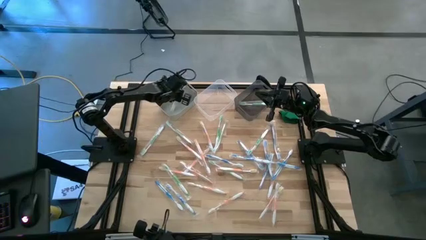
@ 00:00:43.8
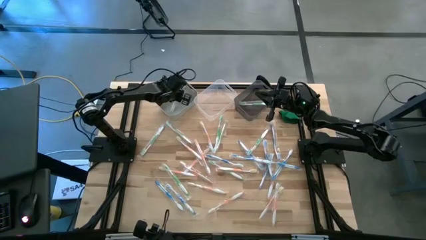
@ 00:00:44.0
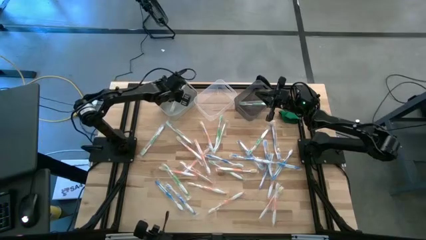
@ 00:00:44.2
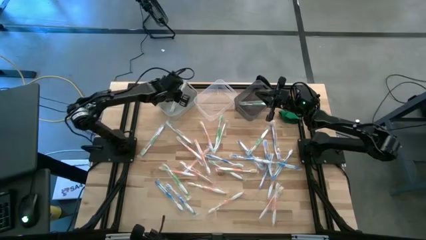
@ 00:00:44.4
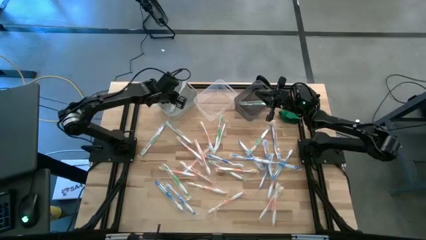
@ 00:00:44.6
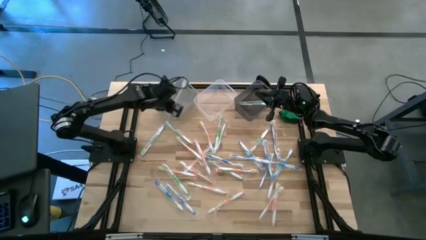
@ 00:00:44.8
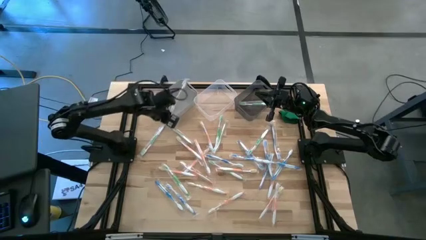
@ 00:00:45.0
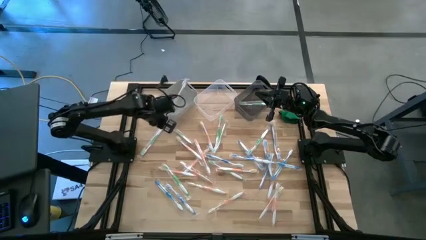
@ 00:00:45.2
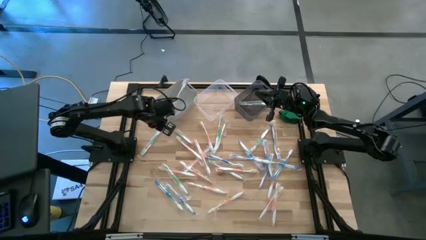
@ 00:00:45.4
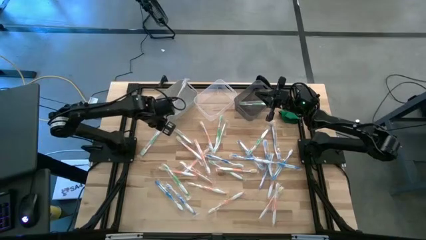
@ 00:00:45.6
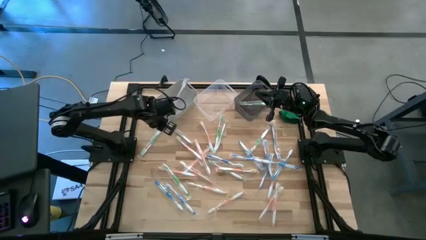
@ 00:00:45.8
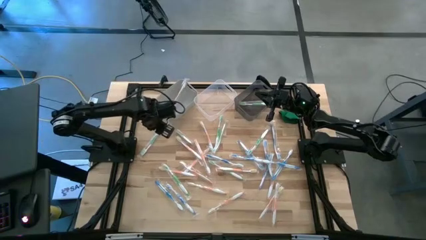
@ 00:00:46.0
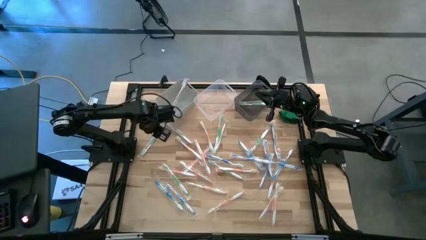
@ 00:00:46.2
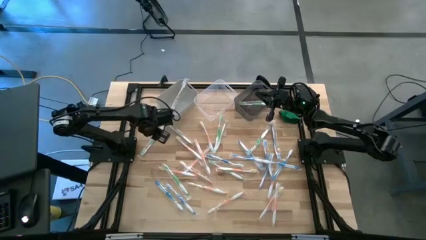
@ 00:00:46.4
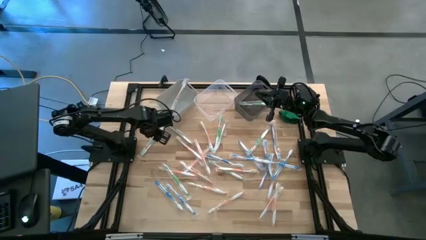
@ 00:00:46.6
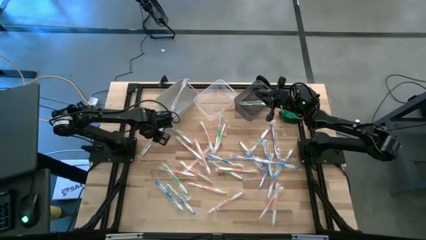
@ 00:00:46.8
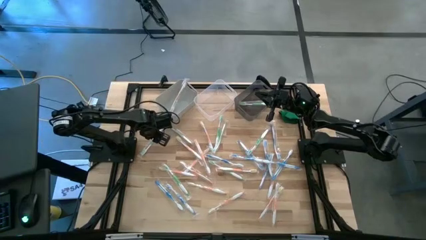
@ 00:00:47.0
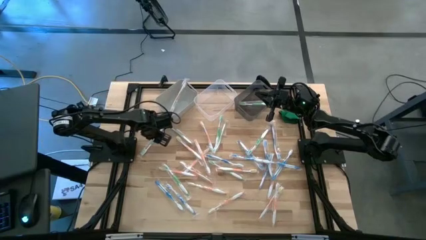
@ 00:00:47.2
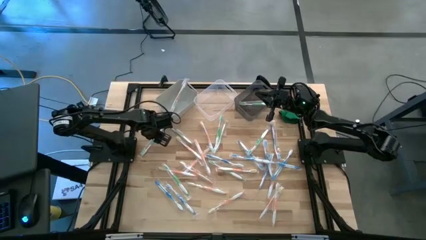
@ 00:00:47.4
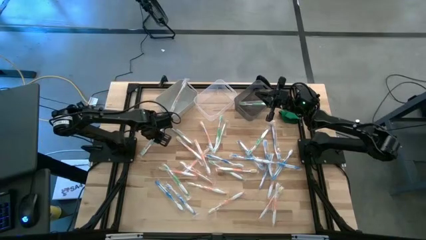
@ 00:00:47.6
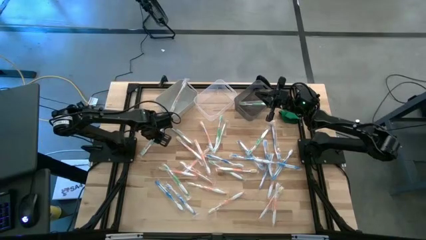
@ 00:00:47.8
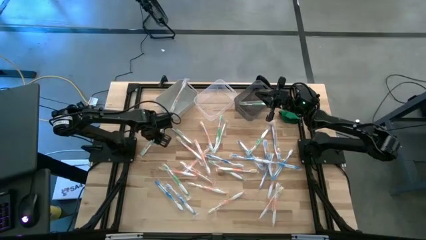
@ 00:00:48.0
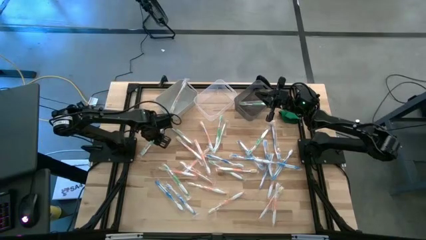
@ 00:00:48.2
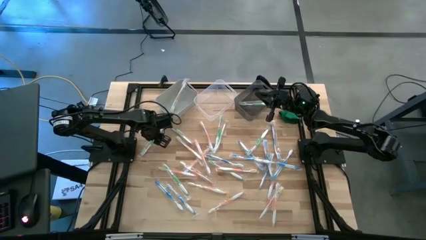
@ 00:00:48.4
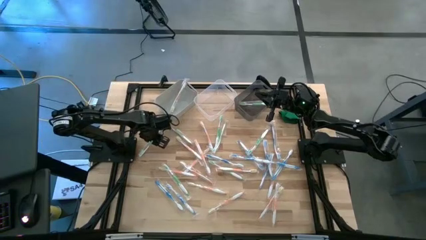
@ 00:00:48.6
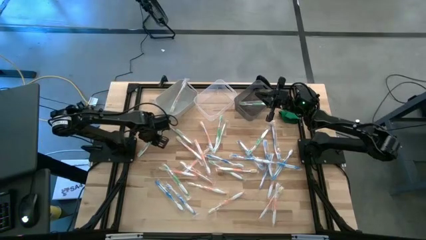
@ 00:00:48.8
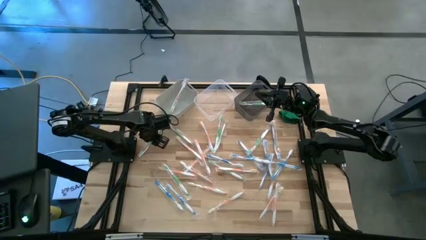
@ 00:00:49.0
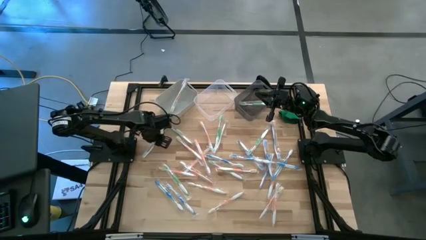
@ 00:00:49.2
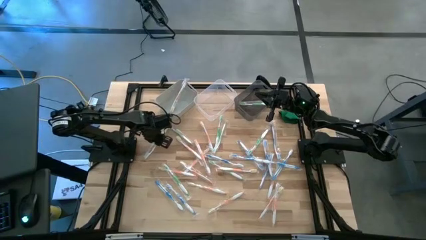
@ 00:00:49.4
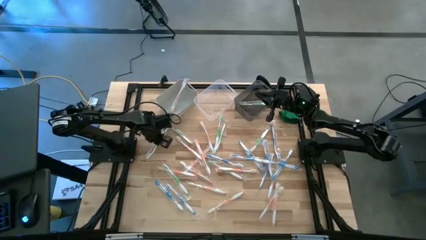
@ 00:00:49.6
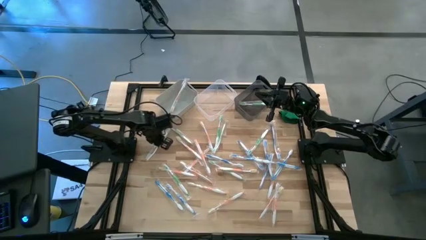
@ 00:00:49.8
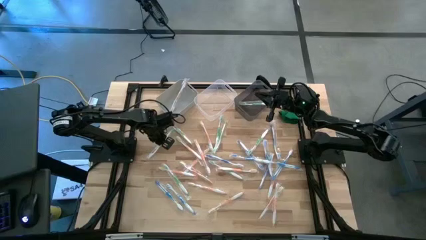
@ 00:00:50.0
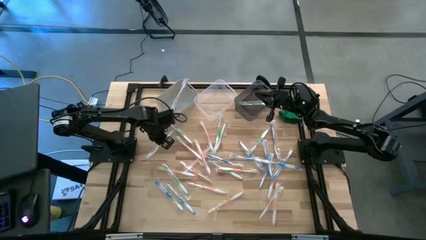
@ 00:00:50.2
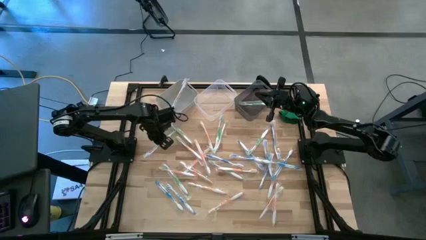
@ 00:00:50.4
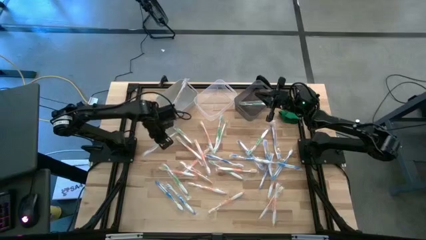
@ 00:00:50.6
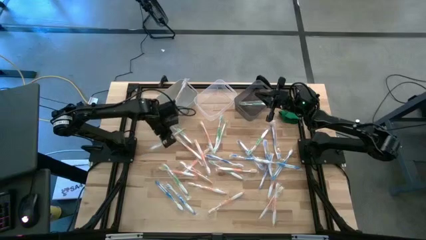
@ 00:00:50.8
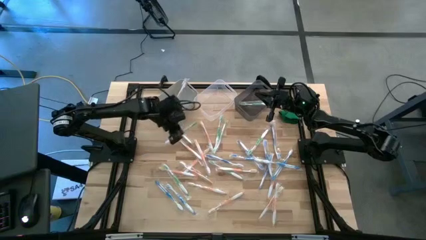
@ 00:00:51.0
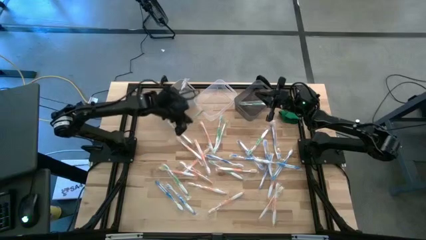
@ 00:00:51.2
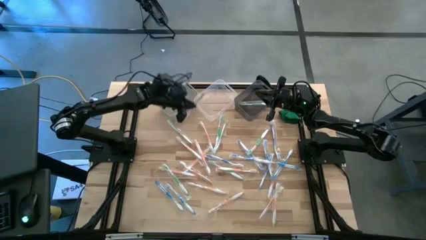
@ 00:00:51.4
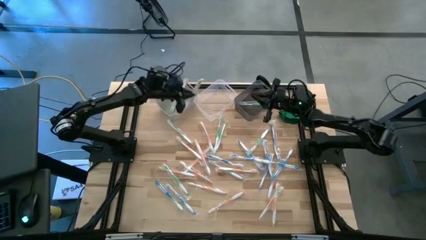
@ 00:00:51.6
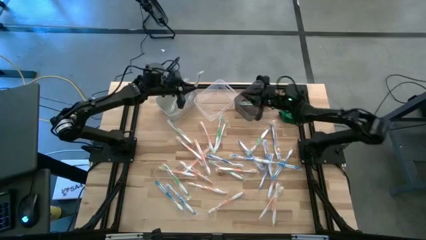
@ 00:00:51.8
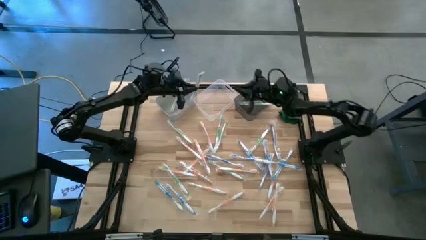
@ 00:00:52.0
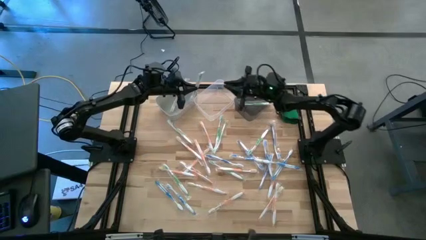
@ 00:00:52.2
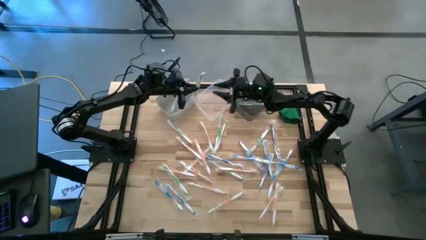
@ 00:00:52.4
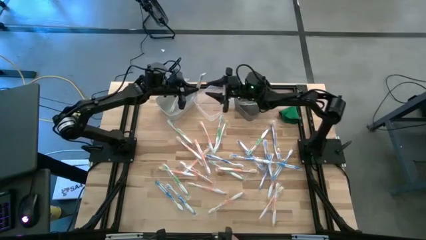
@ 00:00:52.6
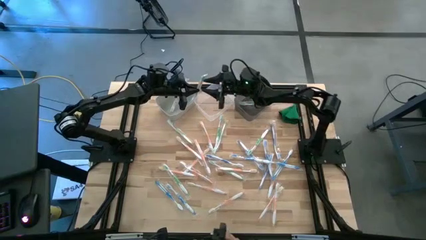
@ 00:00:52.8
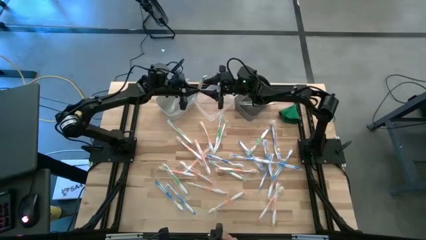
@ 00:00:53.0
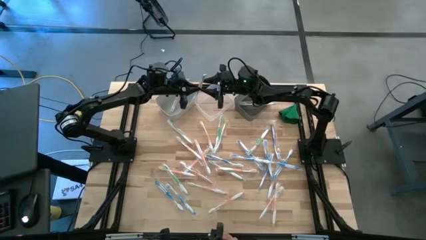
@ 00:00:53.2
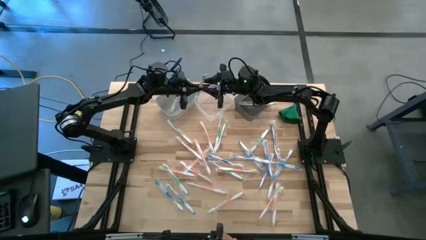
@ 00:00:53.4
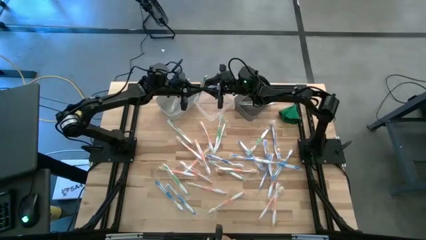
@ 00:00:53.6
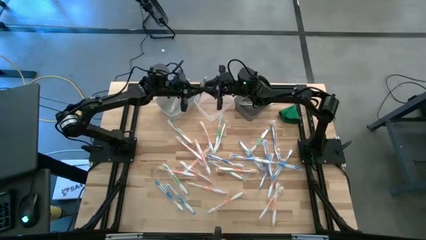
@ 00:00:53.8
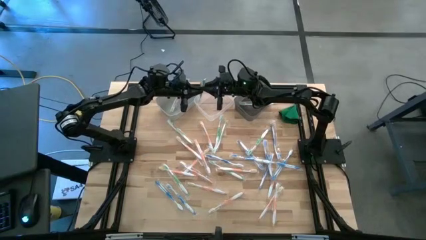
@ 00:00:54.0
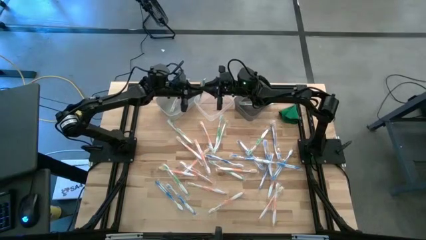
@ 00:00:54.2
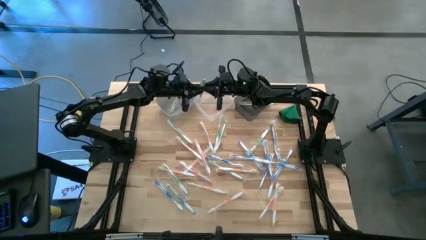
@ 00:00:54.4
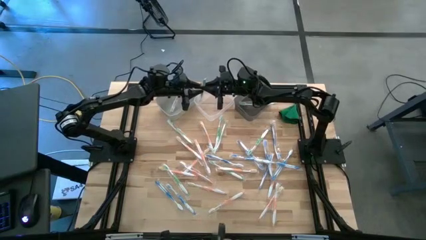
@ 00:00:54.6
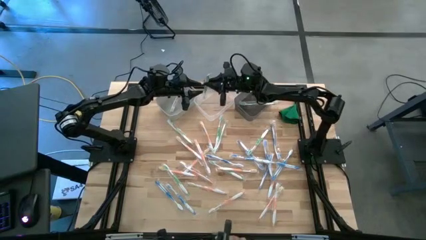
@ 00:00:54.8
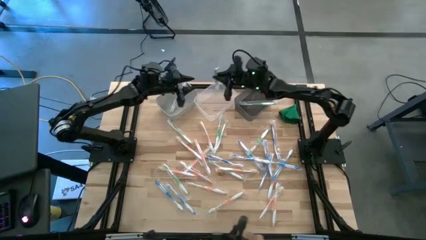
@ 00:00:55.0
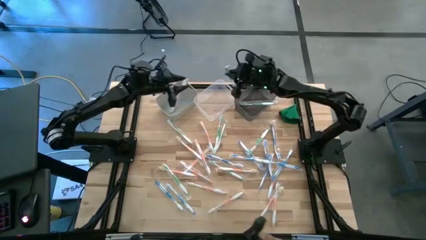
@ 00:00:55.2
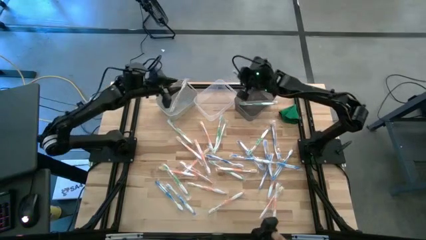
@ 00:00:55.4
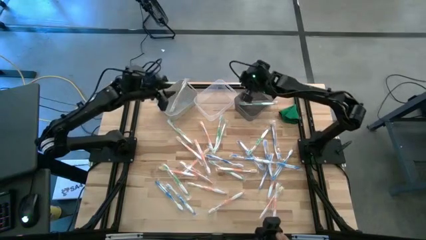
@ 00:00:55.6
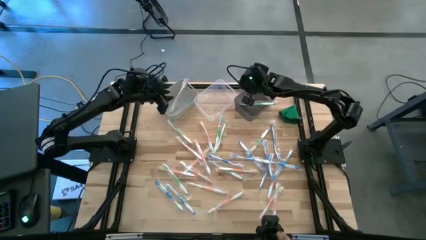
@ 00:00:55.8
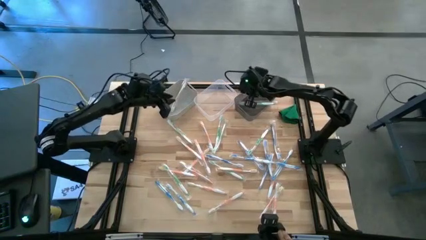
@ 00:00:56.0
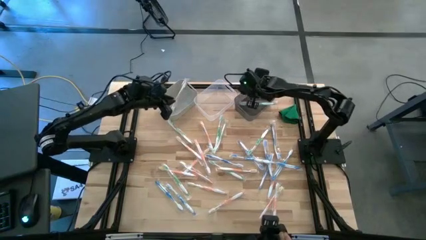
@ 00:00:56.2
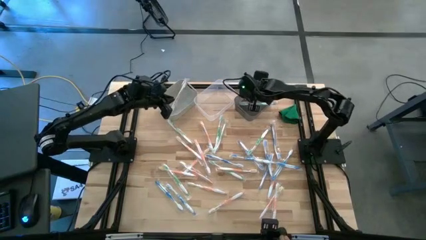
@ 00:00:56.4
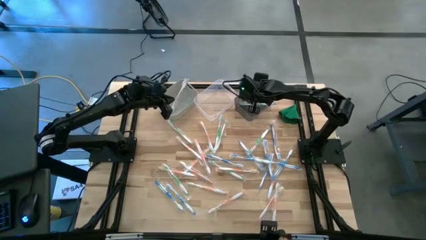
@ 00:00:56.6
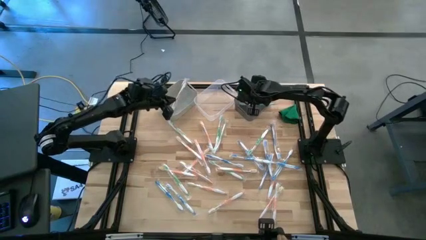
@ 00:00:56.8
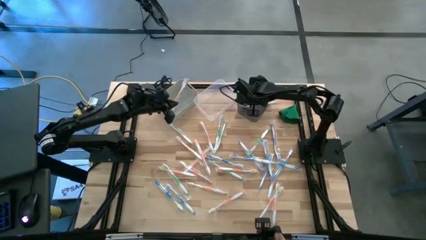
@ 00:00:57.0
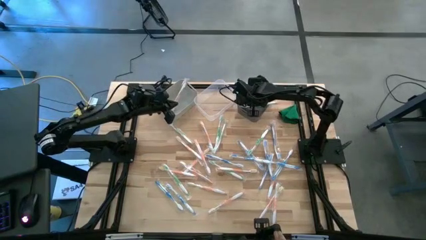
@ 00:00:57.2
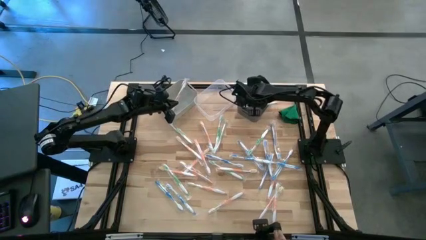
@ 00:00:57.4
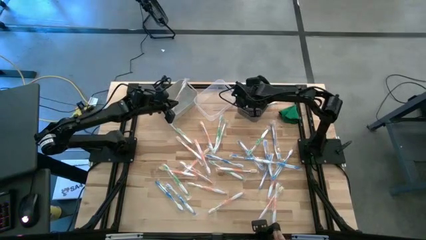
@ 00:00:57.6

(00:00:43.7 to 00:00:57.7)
Task: Pick & Place Toothbrushes
Put the green toothbrush into the black bin

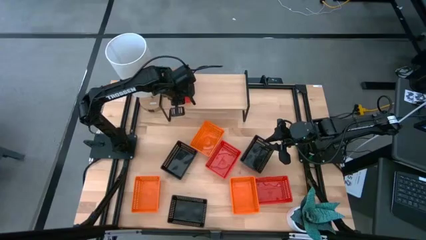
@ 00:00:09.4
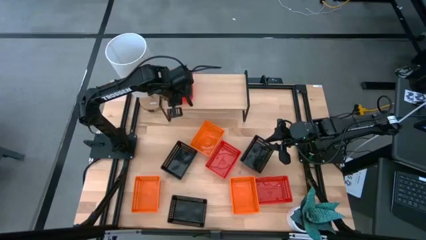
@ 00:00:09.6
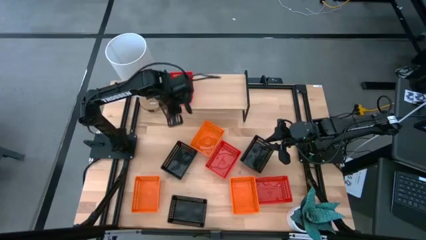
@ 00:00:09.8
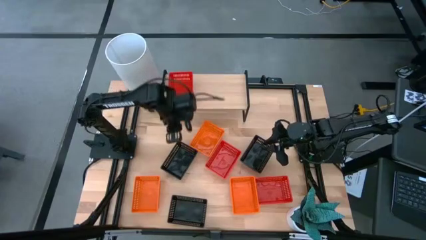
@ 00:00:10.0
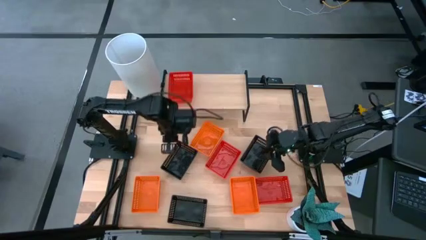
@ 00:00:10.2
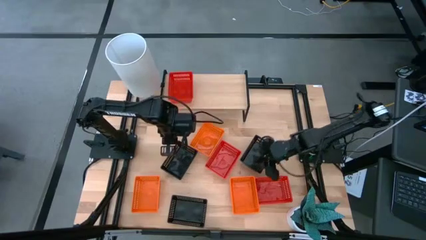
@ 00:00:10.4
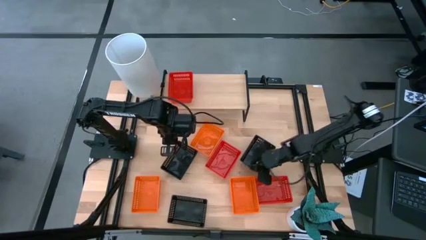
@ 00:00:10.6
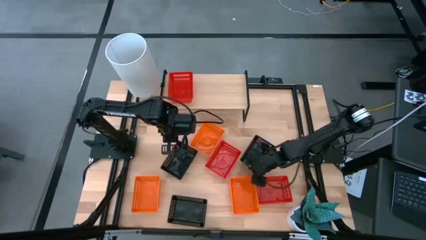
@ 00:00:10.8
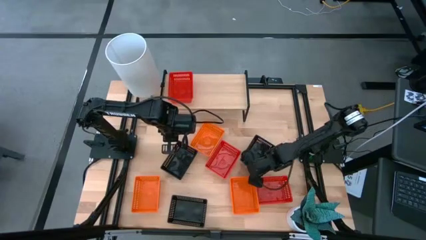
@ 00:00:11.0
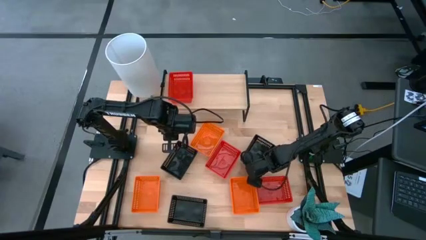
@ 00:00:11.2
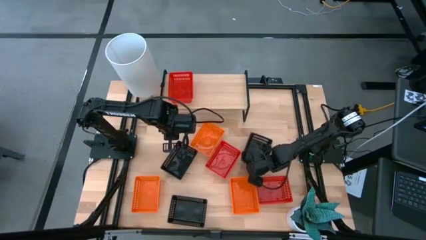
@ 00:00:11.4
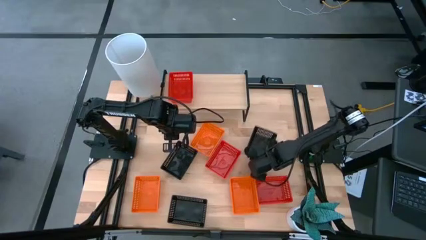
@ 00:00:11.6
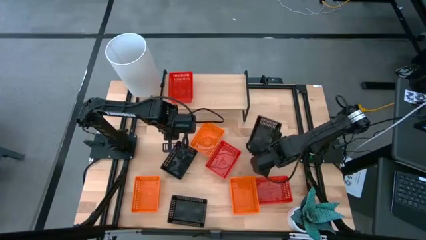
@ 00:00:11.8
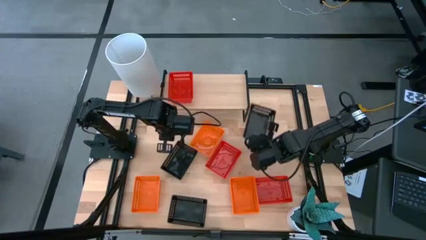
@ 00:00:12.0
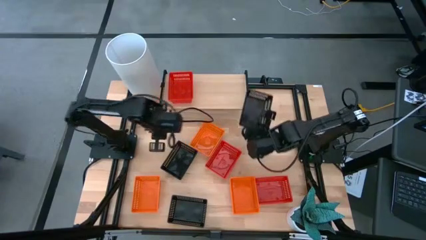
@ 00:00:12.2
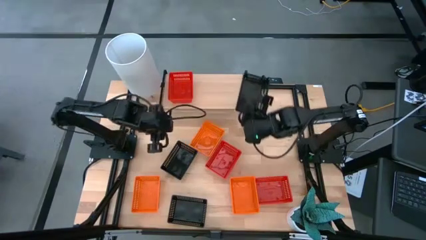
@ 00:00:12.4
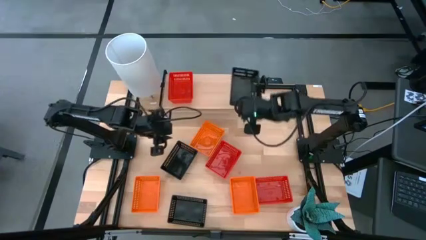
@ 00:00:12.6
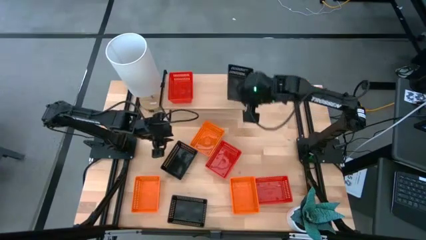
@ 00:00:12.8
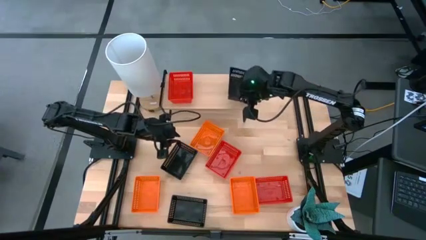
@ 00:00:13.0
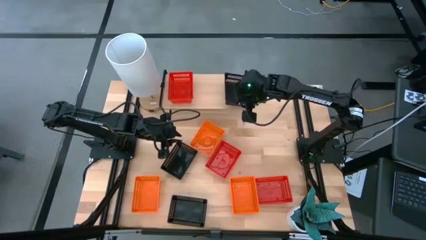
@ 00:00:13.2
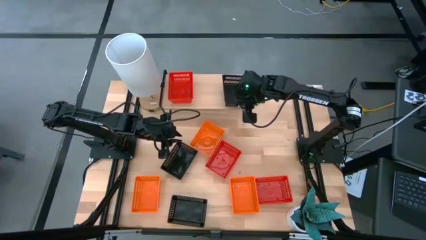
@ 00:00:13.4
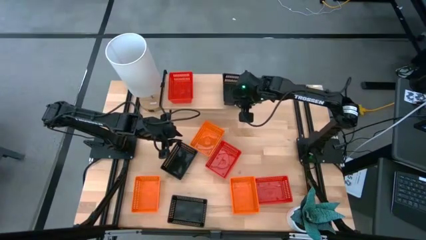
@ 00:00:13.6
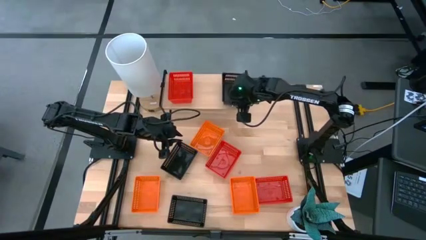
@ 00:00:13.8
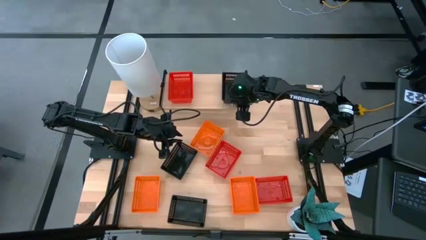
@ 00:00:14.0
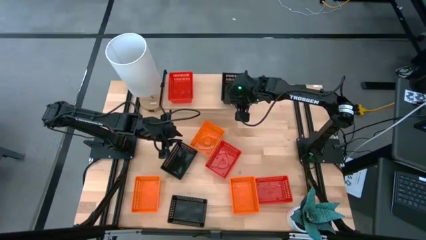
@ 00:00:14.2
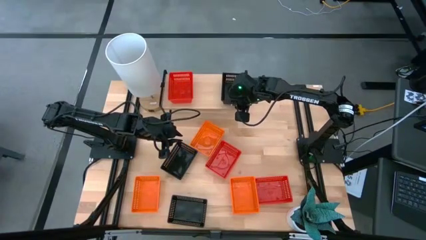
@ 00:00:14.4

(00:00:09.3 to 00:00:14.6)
Task: Stack baskets on shelf by color
Put the top right black bin on the shelf
